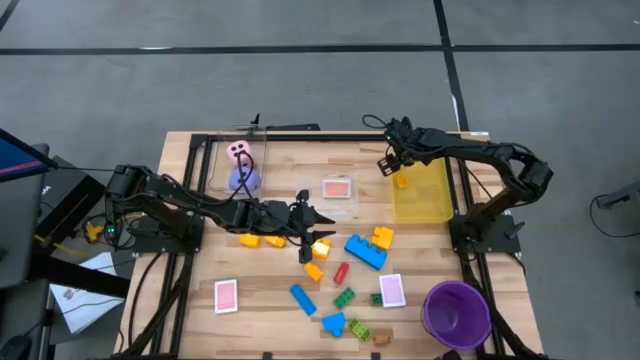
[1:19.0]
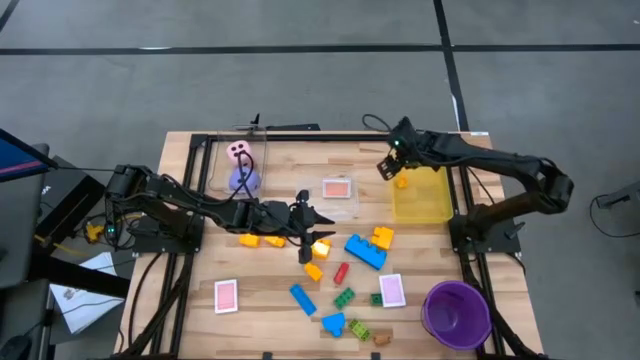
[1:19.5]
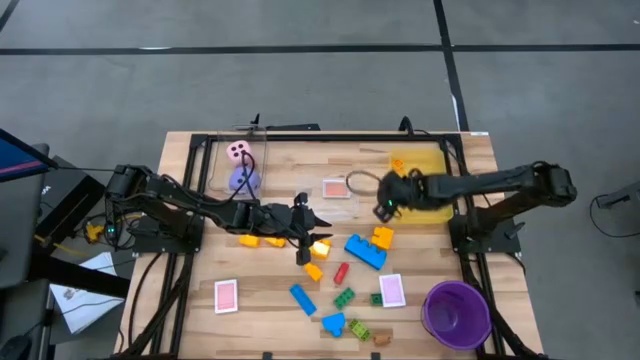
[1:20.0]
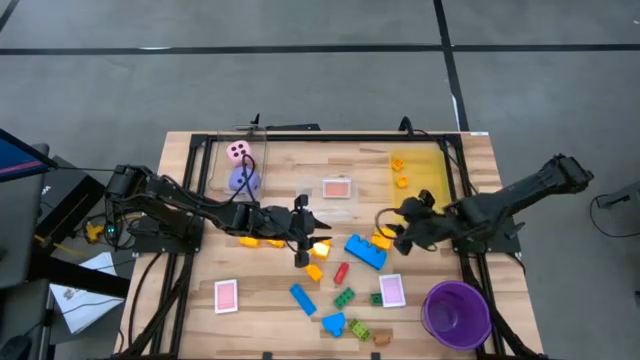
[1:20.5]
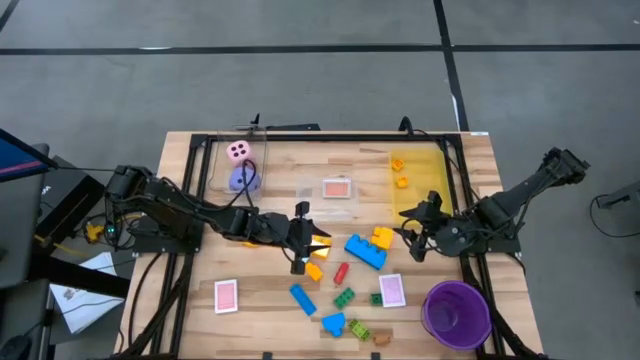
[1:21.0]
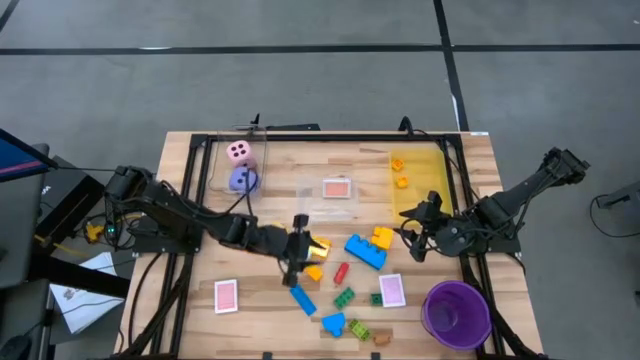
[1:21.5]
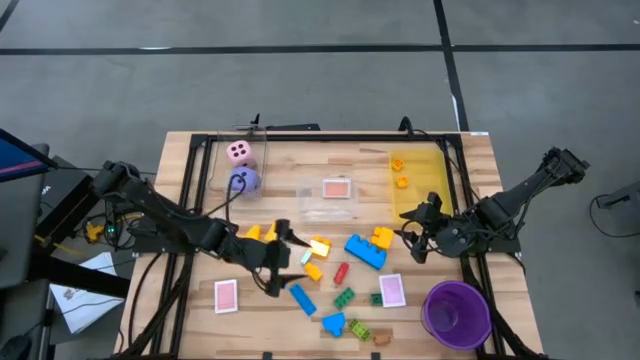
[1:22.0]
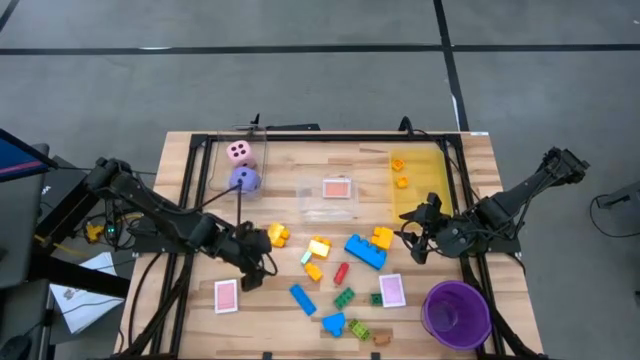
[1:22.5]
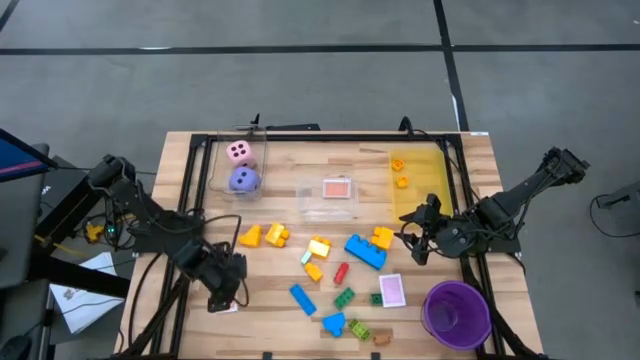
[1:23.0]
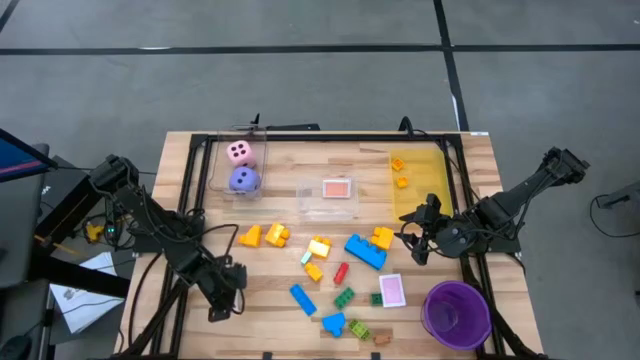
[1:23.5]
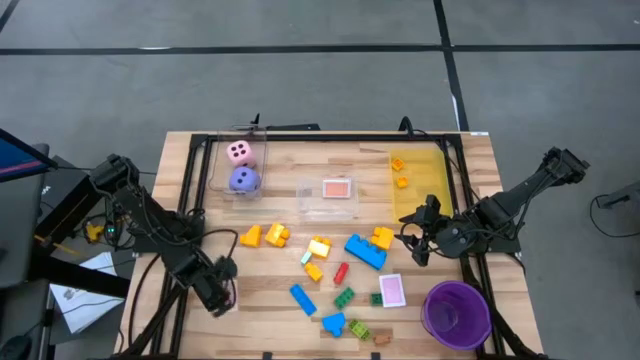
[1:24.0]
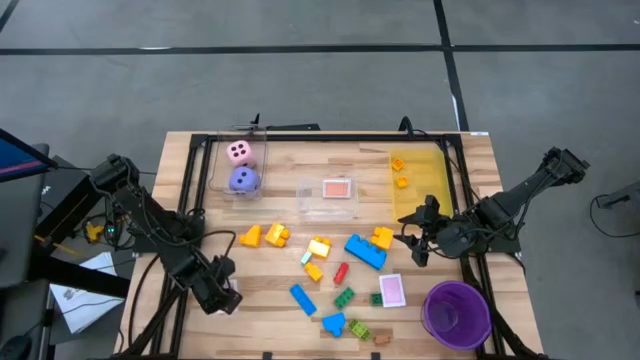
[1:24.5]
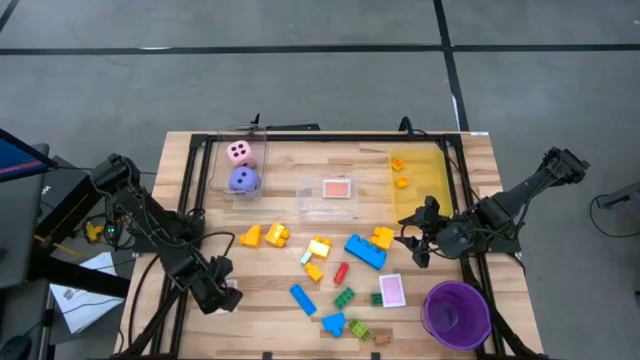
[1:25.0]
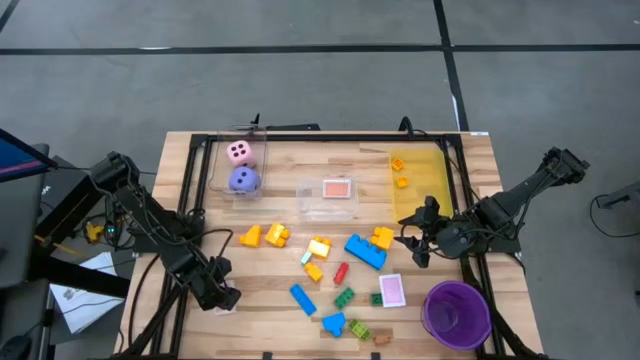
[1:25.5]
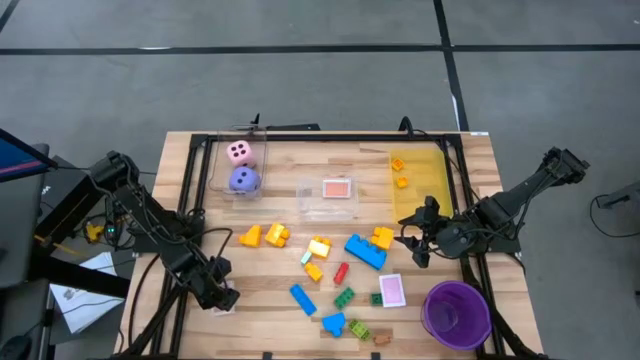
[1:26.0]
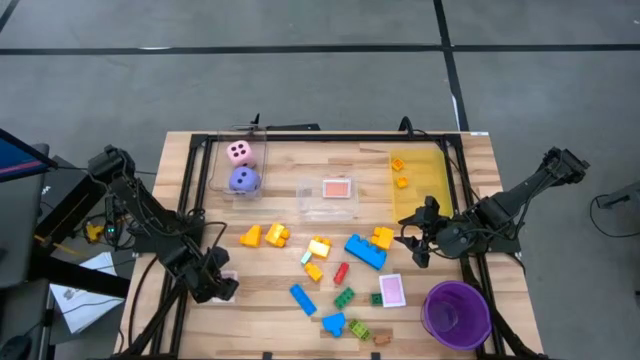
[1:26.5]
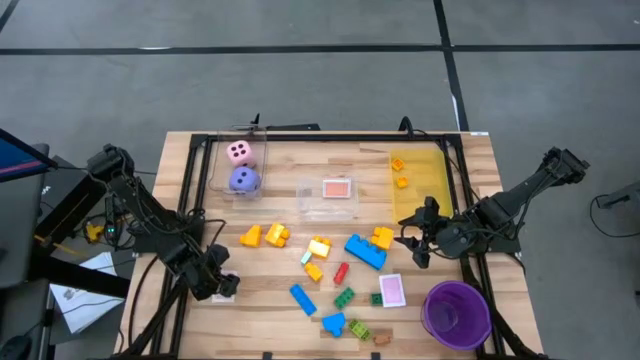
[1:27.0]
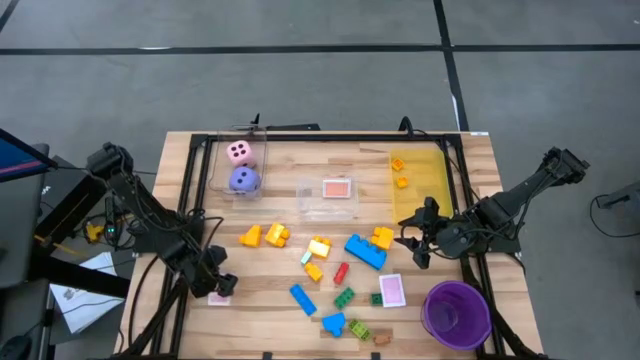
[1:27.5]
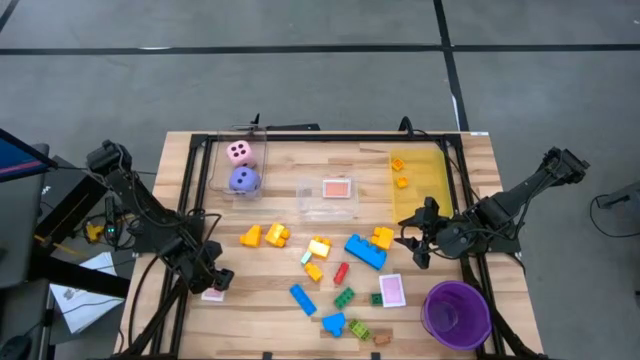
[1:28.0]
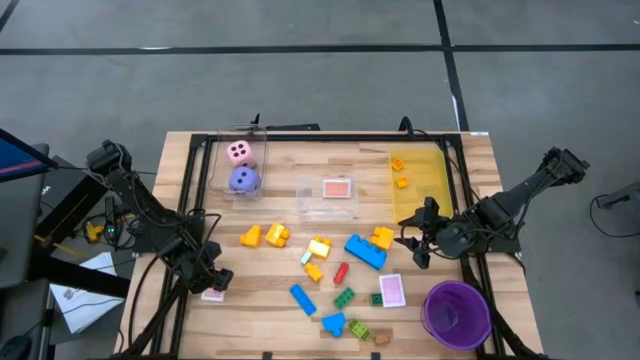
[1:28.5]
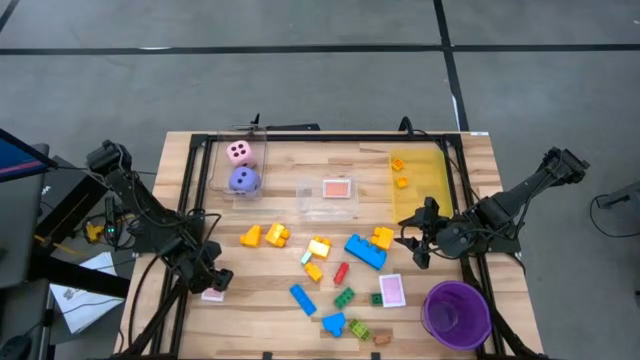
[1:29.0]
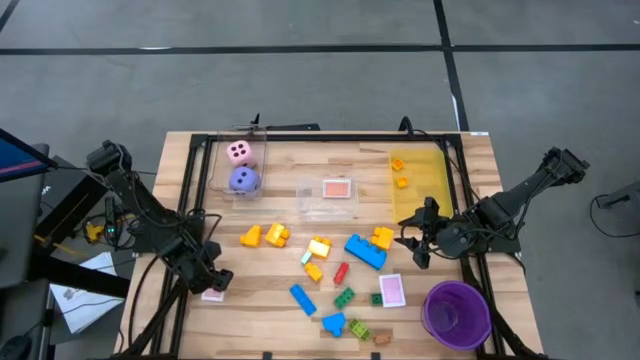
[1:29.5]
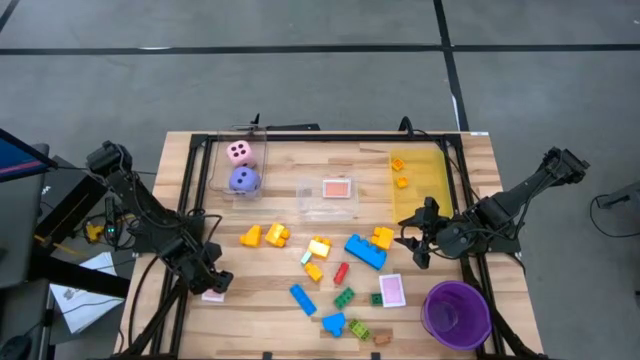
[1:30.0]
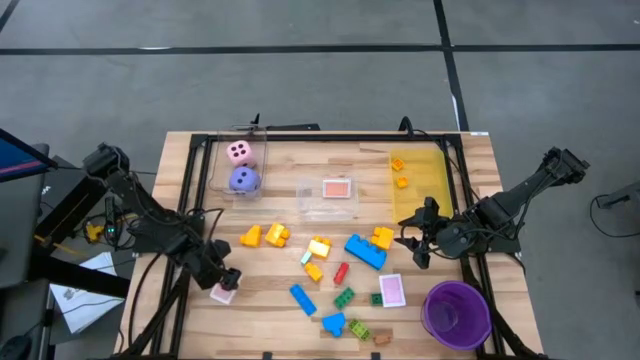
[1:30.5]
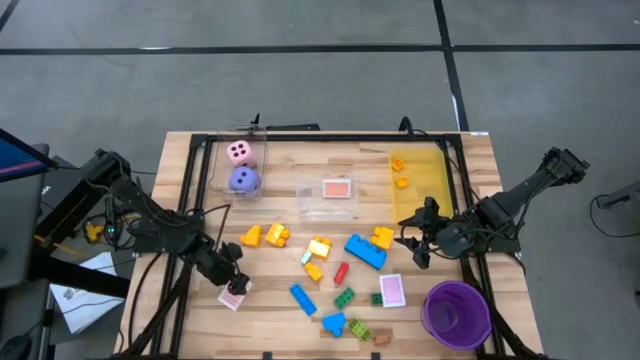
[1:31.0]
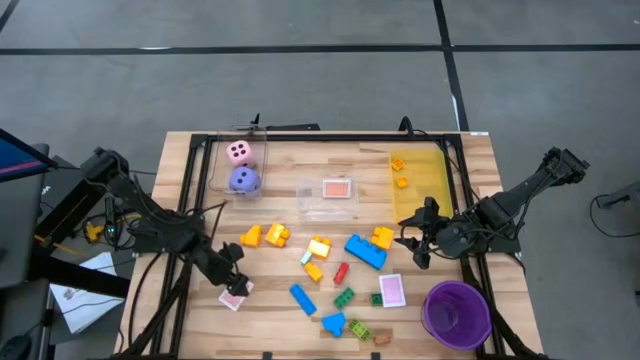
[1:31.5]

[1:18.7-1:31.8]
Task: Pick & Place Toys
Put the red deck of cards into the bottom transparent bin

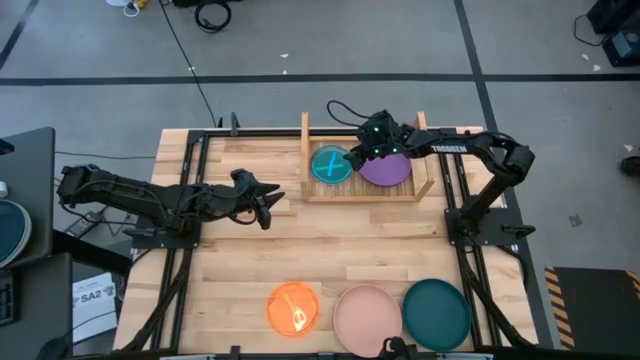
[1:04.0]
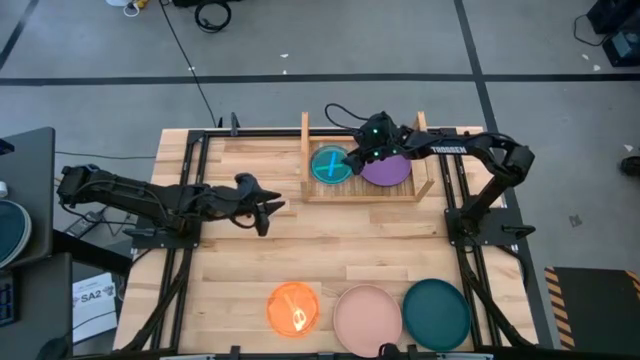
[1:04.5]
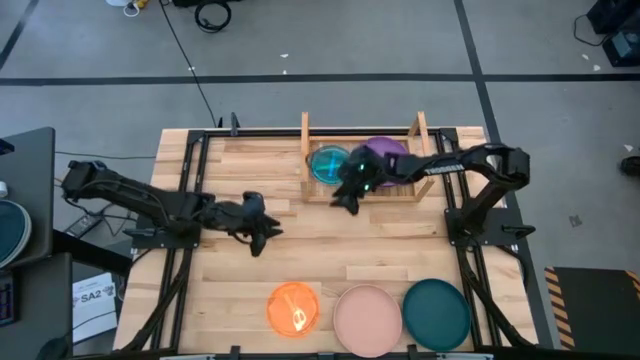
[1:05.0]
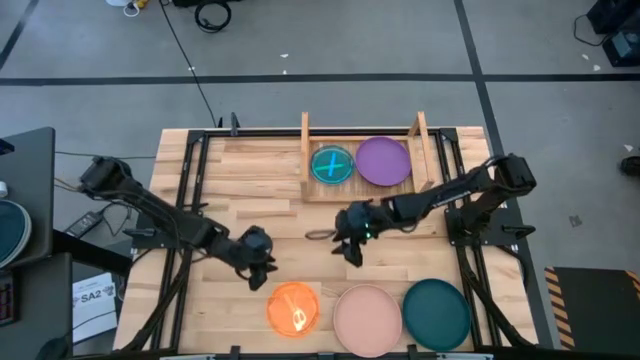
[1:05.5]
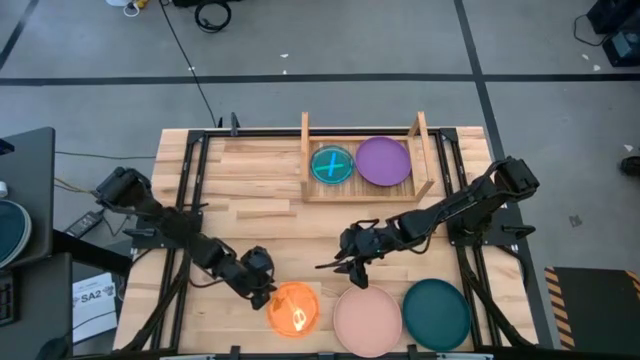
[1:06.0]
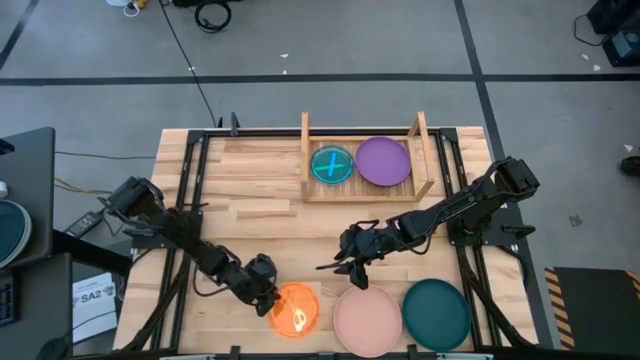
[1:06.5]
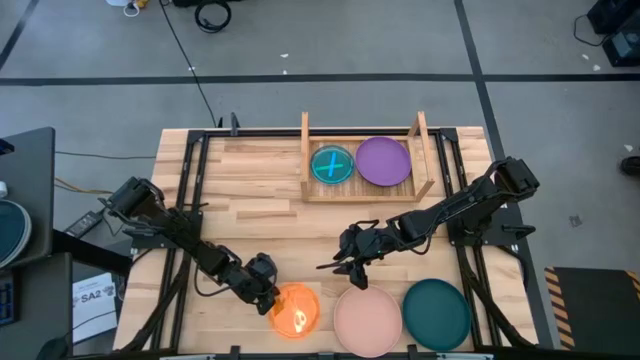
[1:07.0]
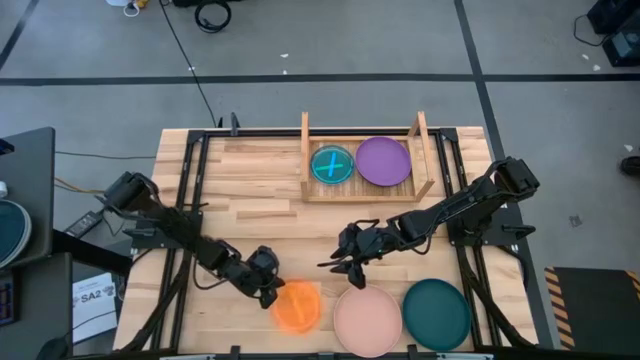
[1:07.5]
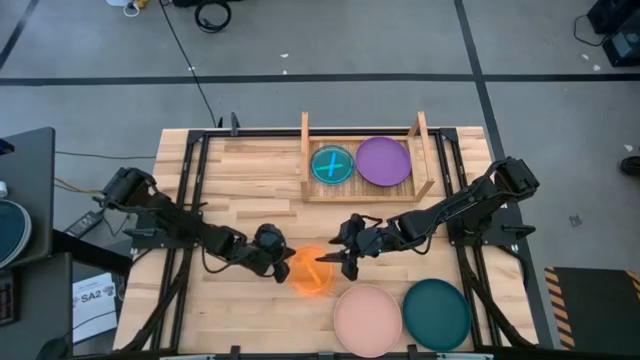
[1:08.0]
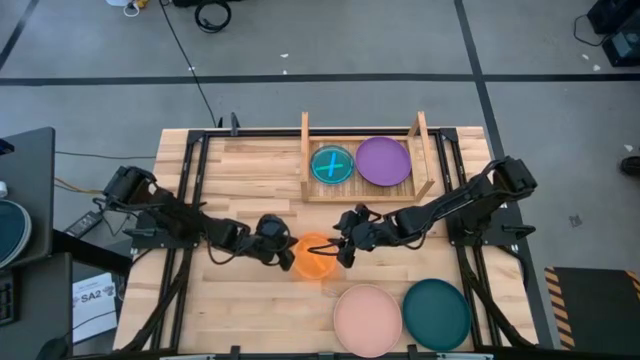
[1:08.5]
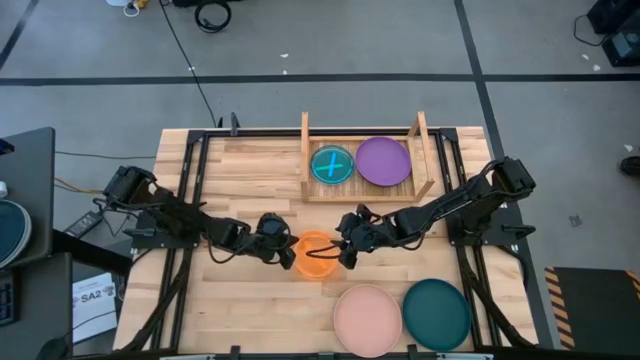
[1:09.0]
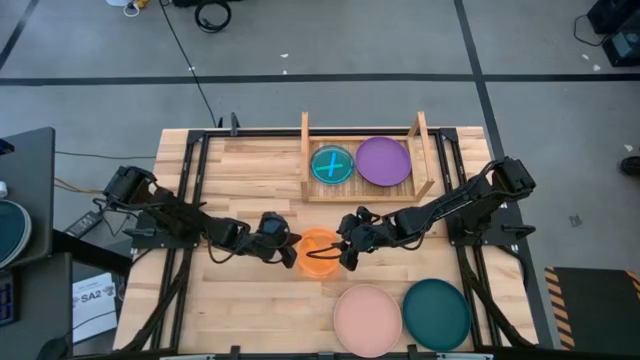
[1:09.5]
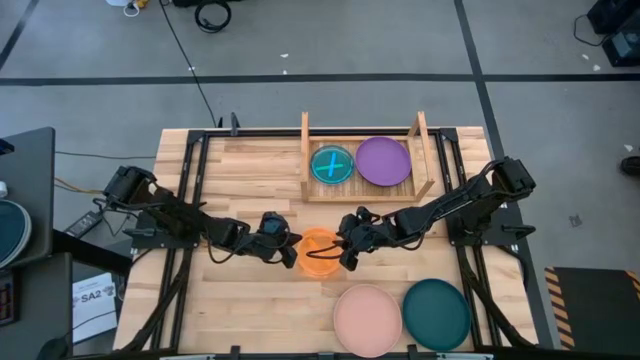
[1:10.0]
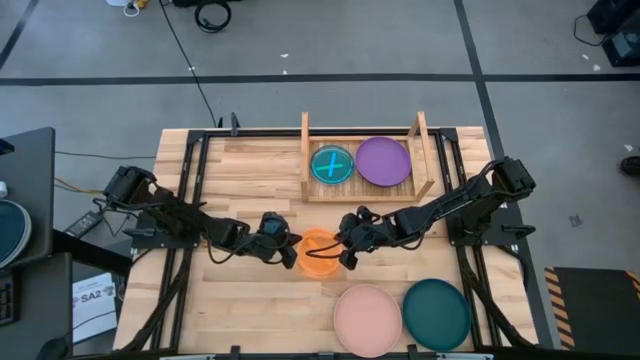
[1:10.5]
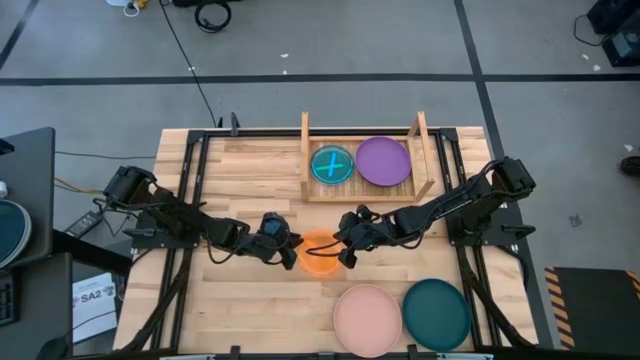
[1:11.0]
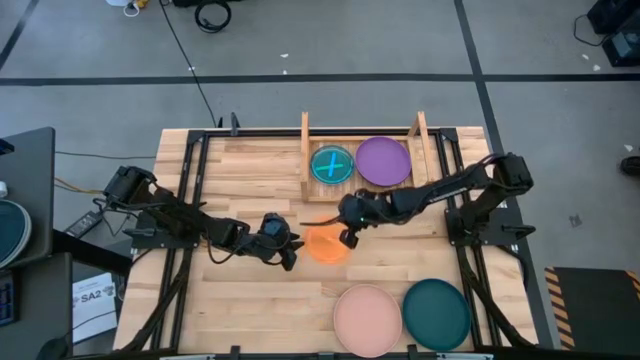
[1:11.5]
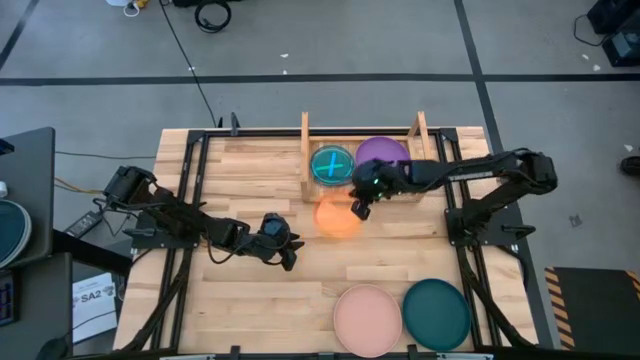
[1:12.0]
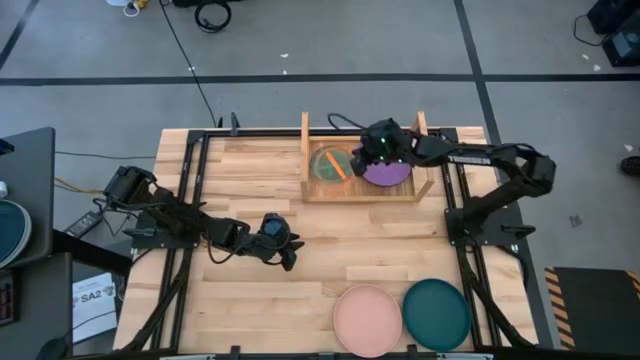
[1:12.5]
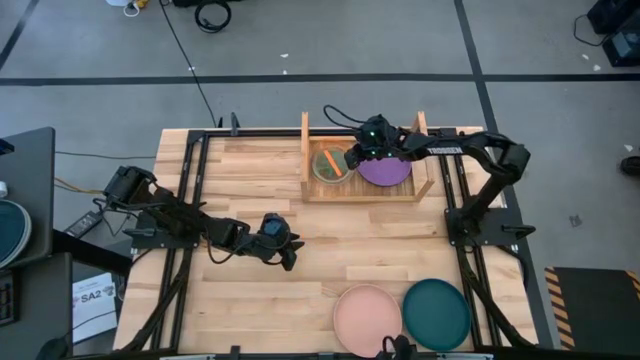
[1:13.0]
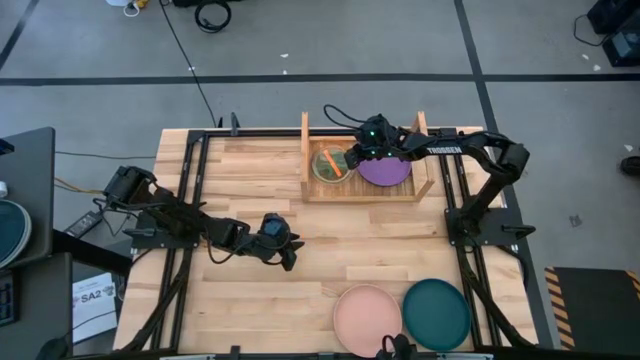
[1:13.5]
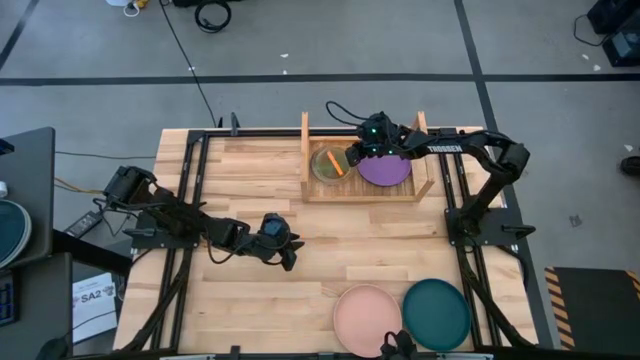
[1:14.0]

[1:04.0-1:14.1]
Task: Place and stack plates onto a shelf
Stack the small orange plate on top of the small blue plate on the shelf
